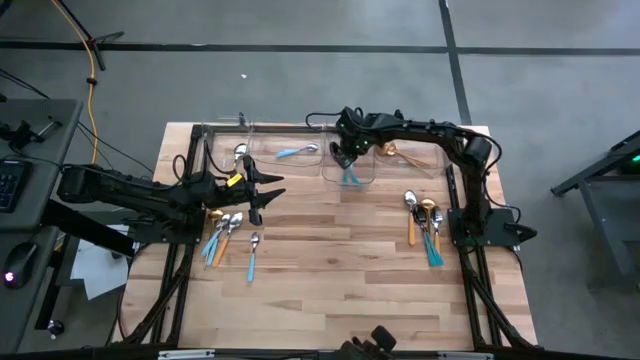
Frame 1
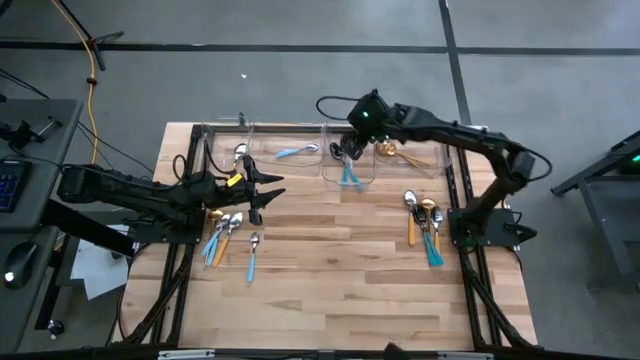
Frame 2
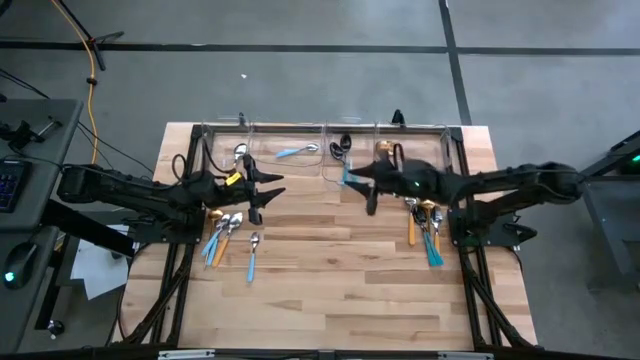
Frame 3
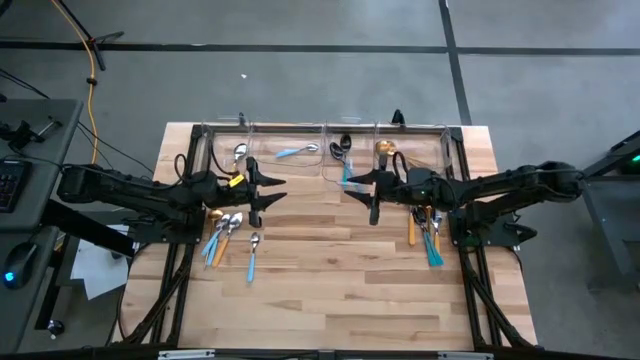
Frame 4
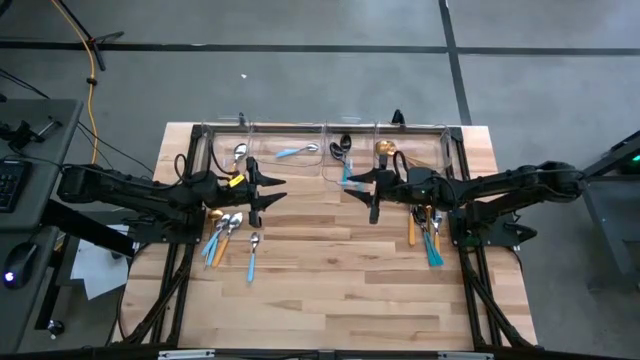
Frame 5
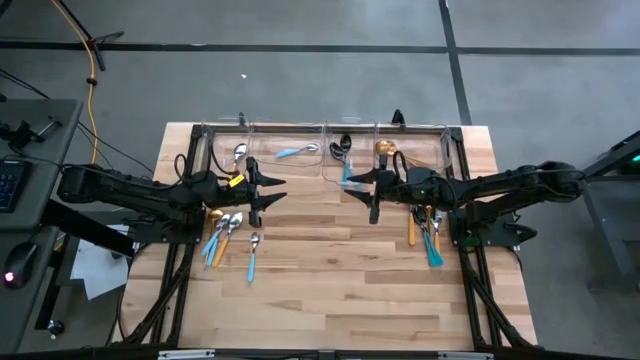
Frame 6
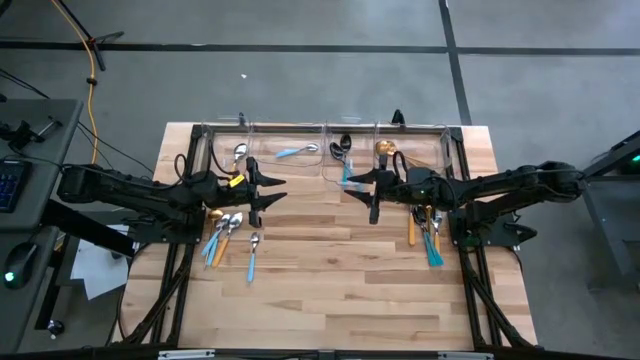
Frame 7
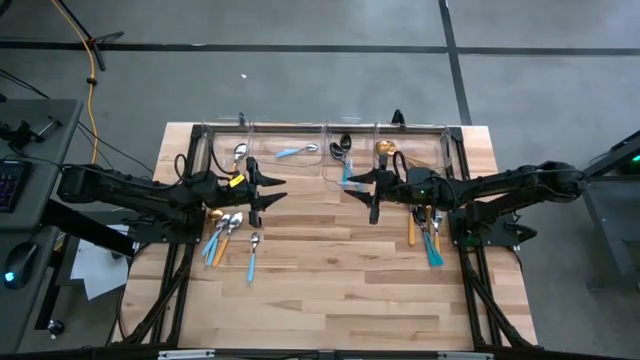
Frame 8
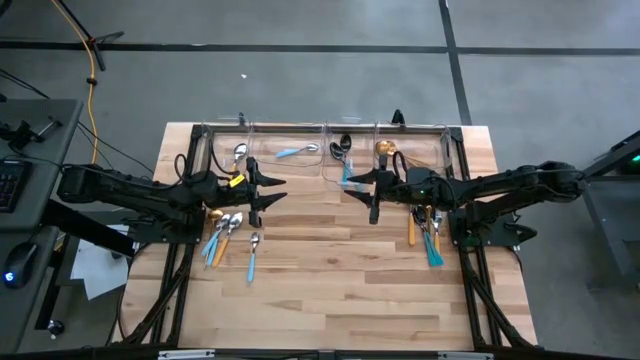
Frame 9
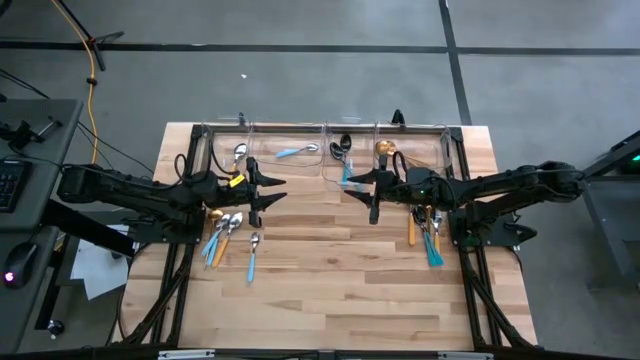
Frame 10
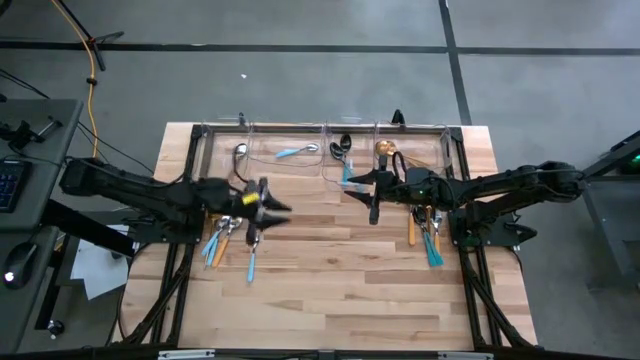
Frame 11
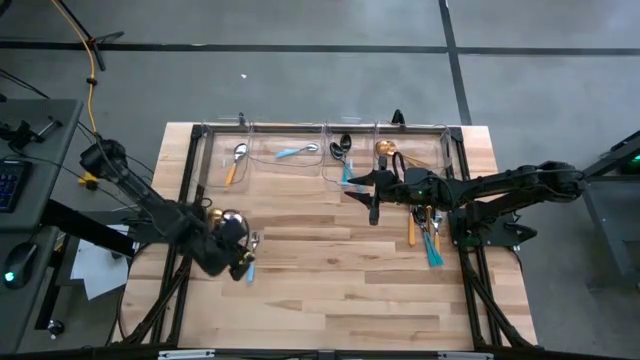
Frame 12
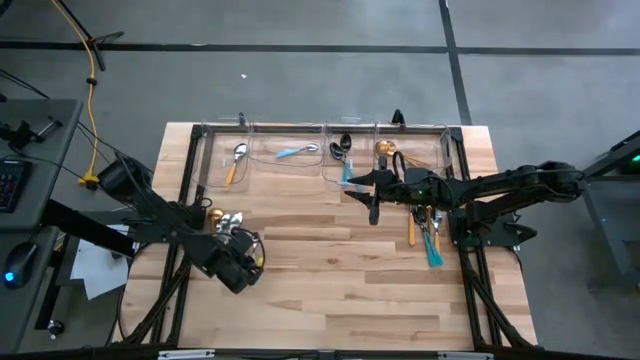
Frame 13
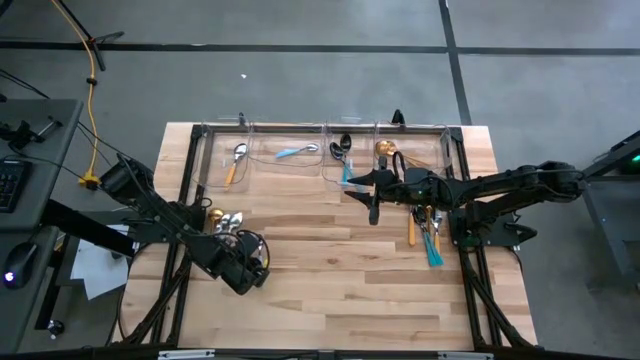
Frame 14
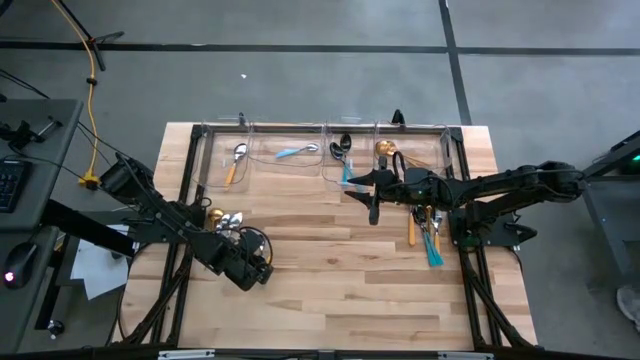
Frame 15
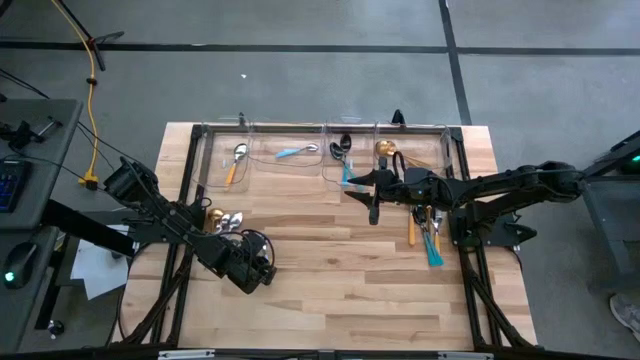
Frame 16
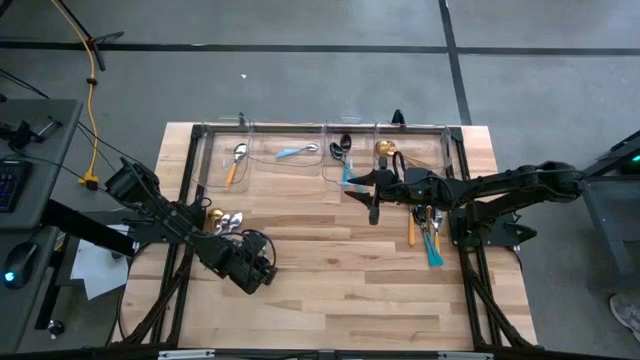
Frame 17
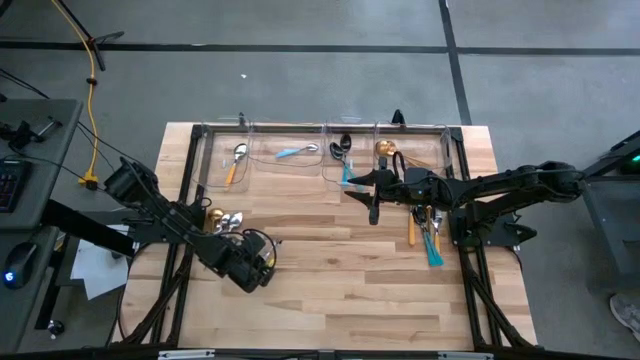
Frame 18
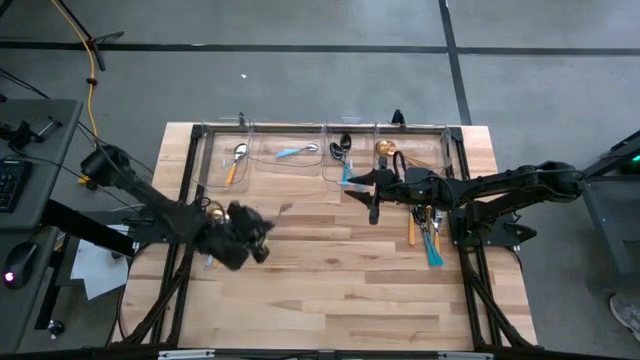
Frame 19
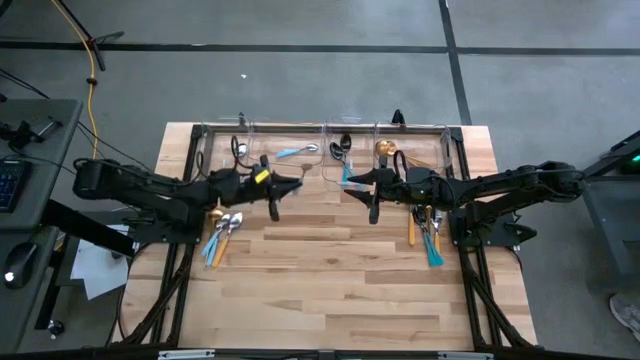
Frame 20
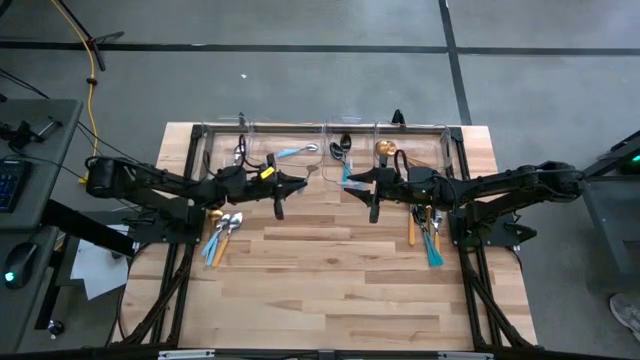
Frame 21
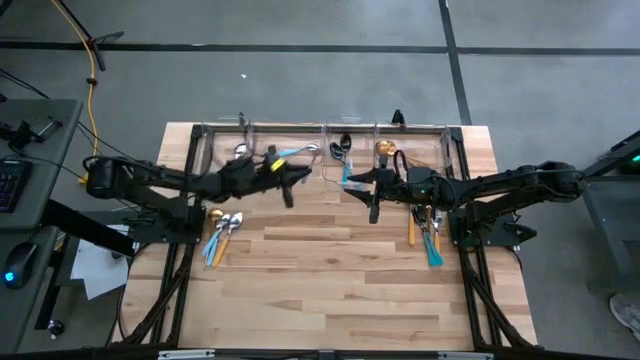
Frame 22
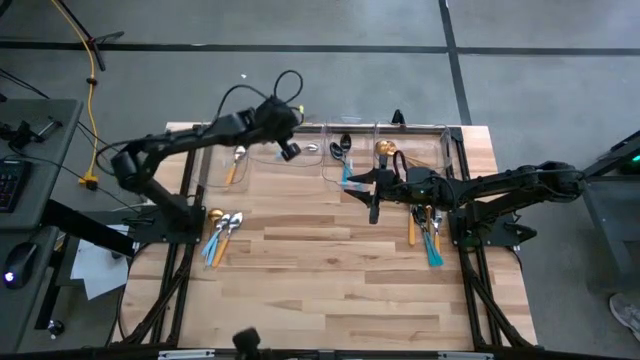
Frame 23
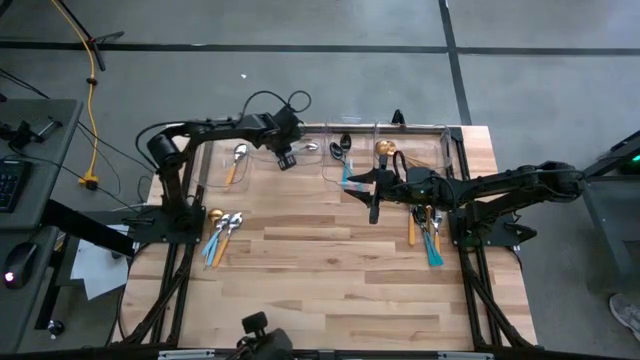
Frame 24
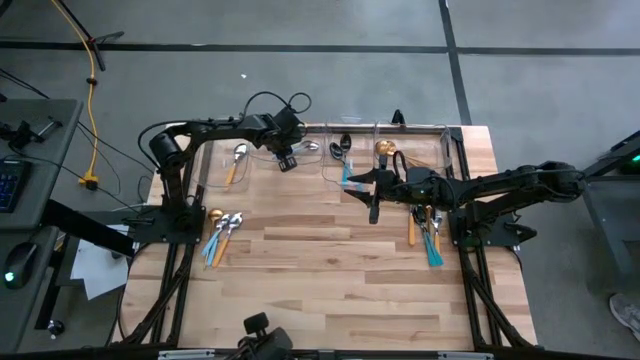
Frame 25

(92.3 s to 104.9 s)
Task: Sort silverware by color (type)
Put the blue spoon into the middle left transparent bin

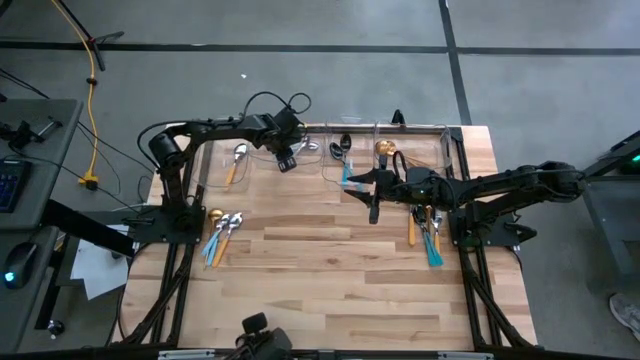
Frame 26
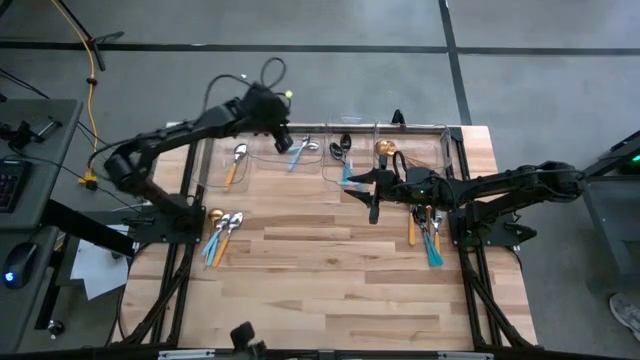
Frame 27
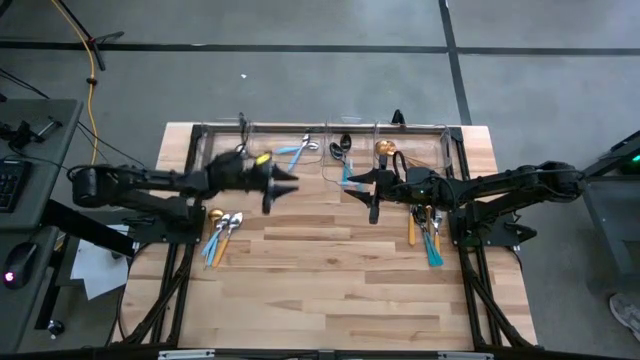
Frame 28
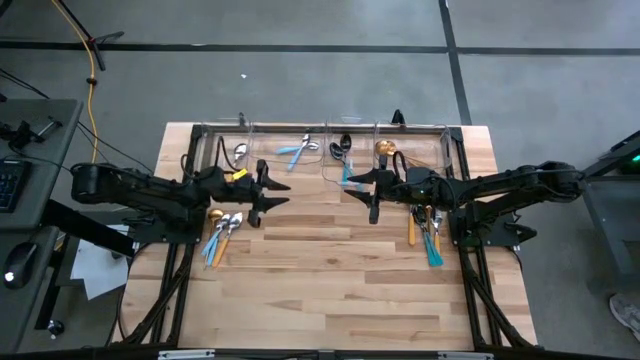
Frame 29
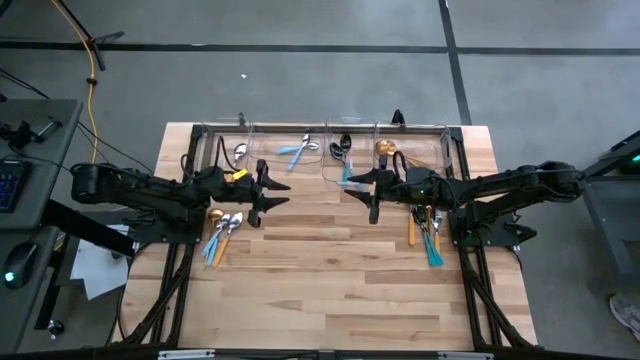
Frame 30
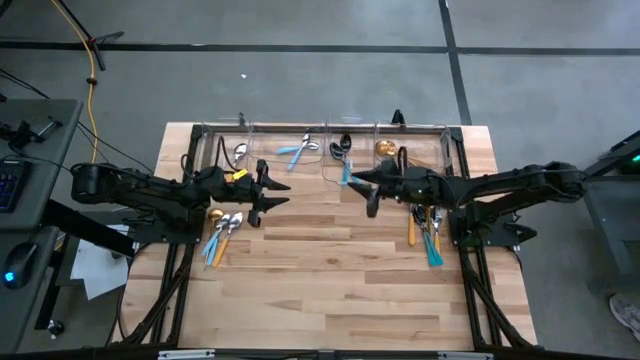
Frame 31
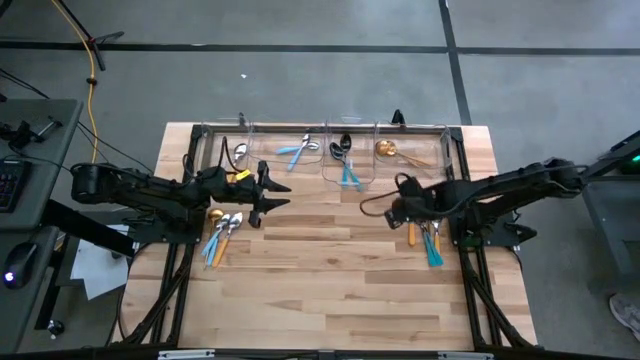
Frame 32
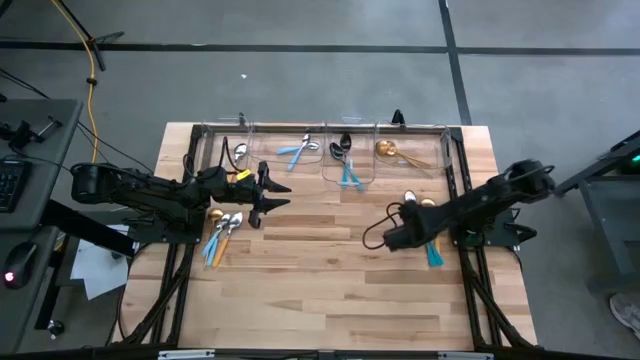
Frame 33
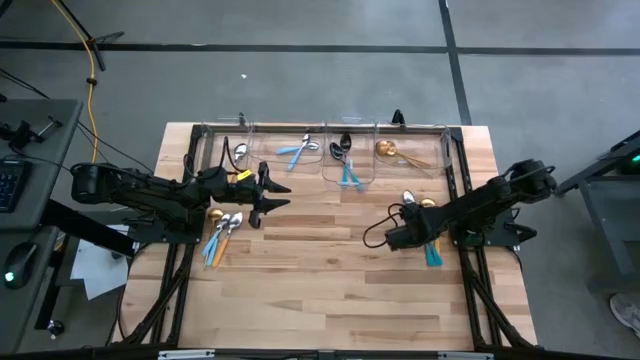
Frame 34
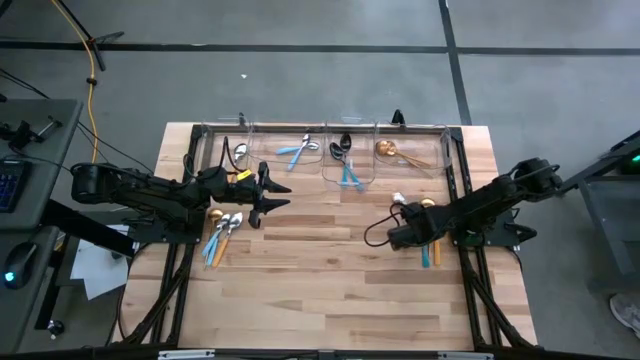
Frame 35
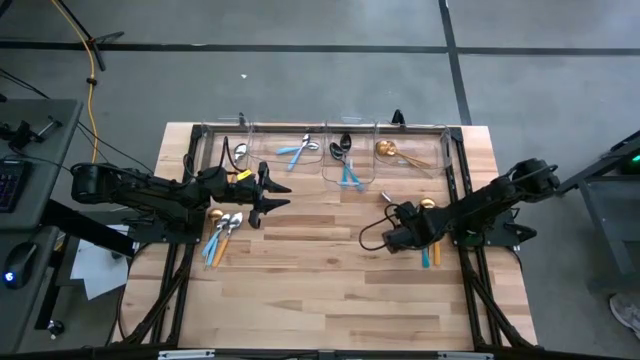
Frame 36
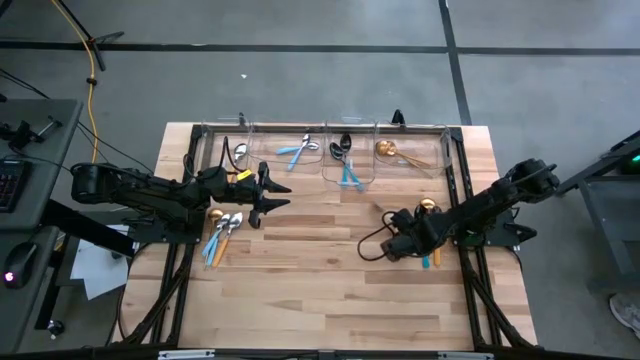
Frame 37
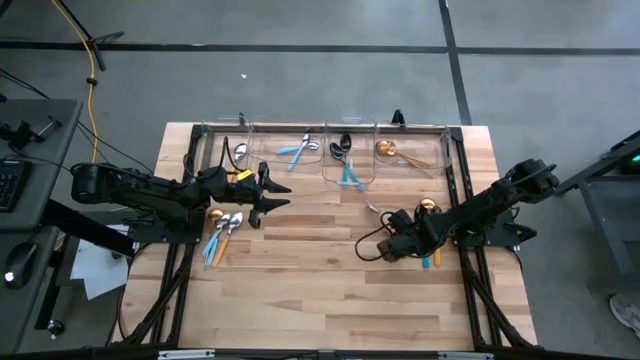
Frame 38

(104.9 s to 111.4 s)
Put the yellow spoon into the left transparent bin

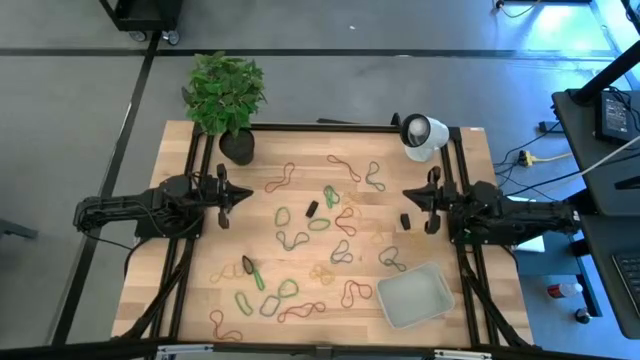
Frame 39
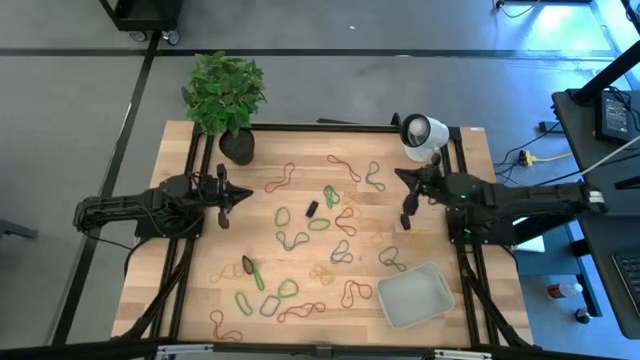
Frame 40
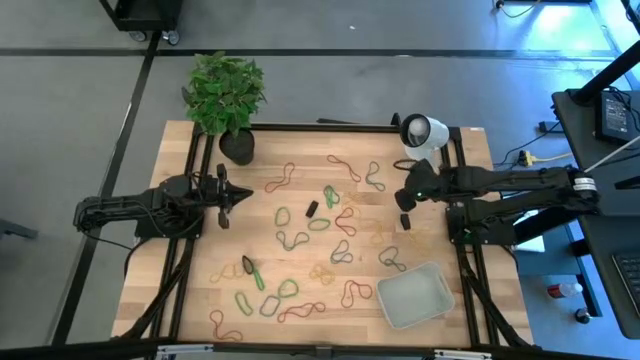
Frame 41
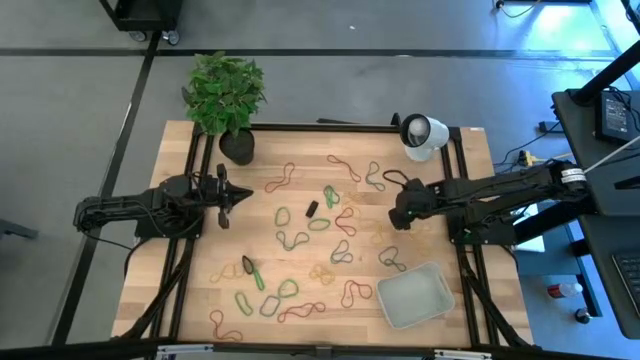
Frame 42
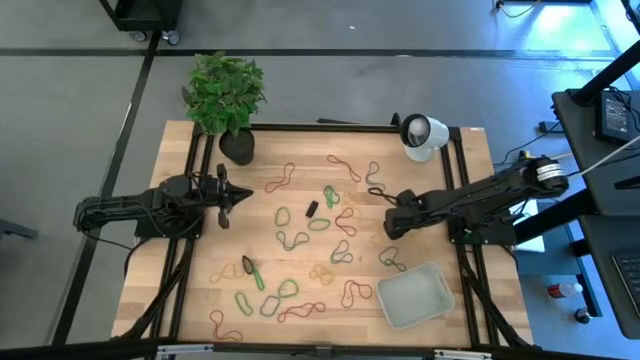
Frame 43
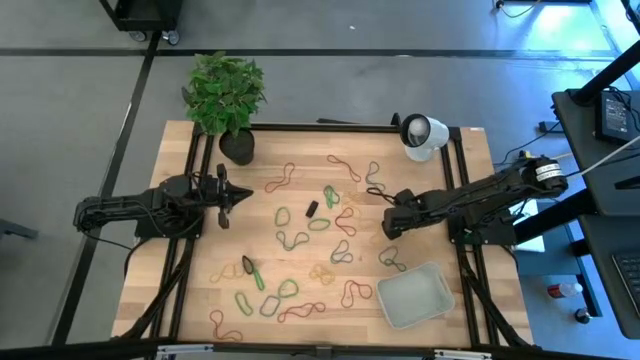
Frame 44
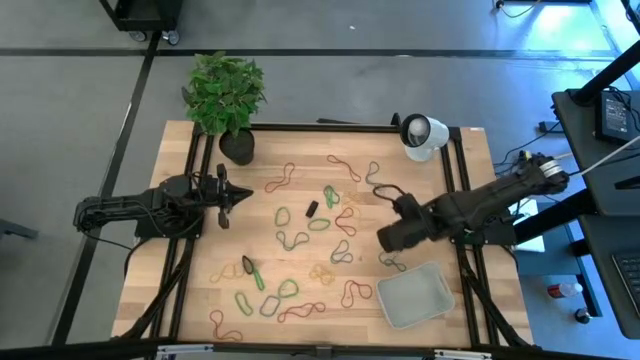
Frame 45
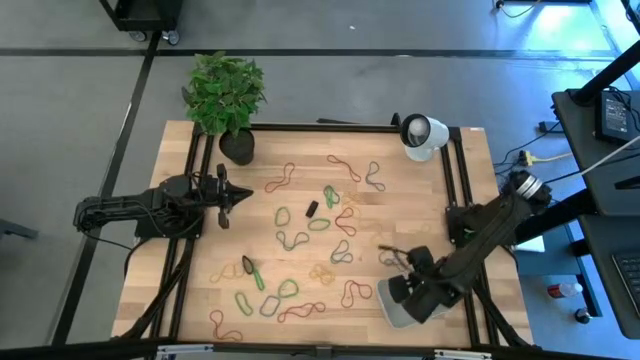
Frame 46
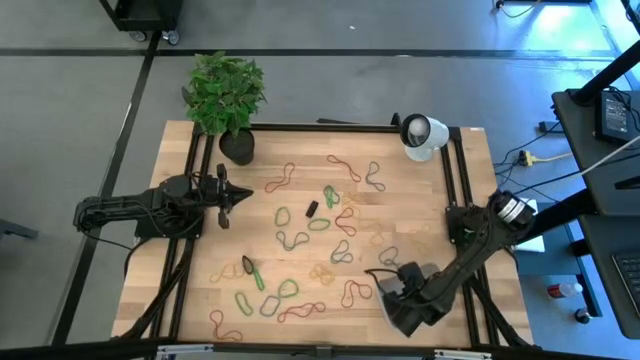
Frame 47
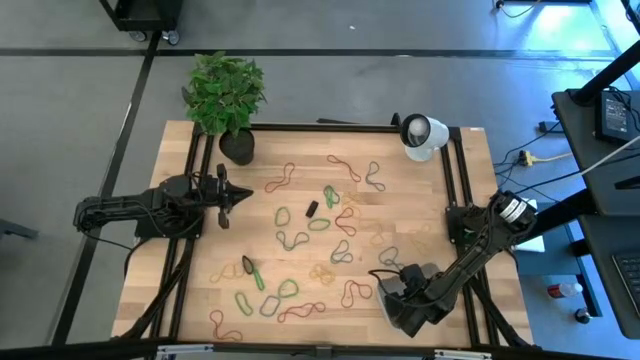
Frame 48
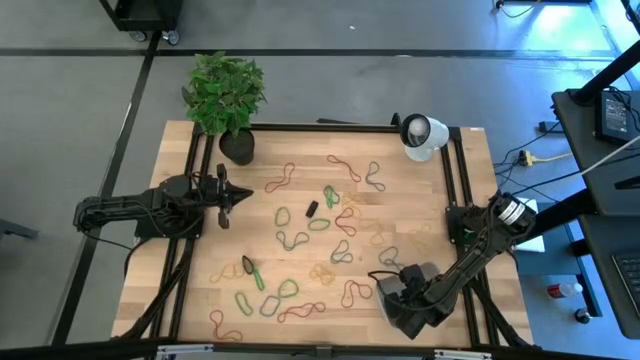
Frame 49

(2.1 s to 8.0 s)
Task: Pick and place rubber bands into bin
Put the black rubber band into the white bin
